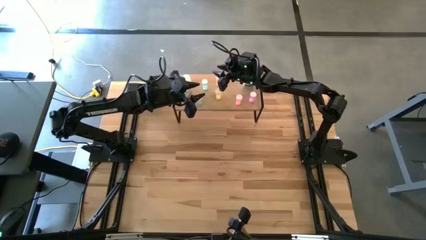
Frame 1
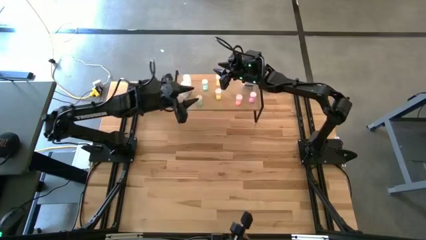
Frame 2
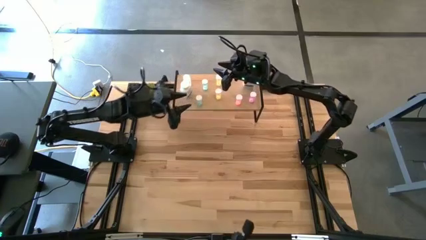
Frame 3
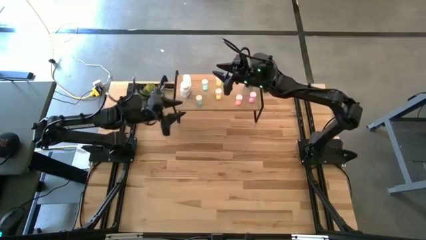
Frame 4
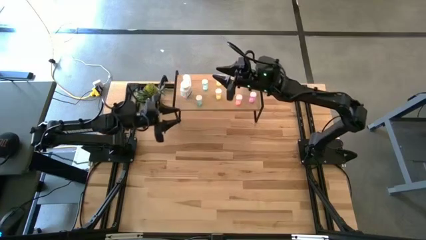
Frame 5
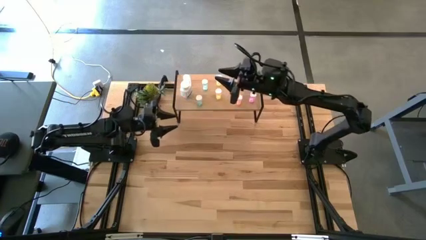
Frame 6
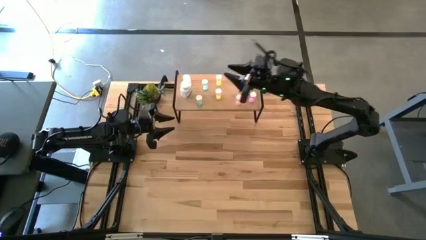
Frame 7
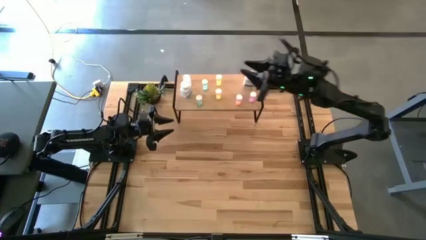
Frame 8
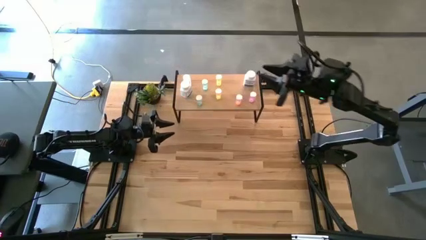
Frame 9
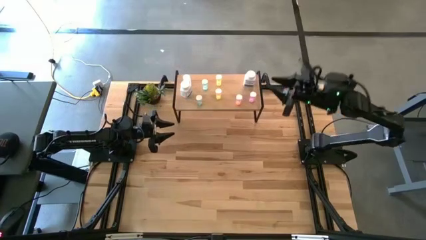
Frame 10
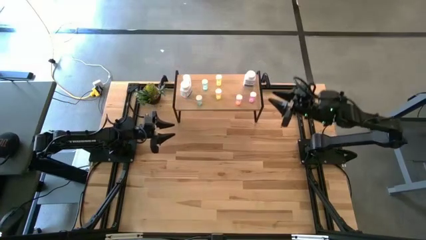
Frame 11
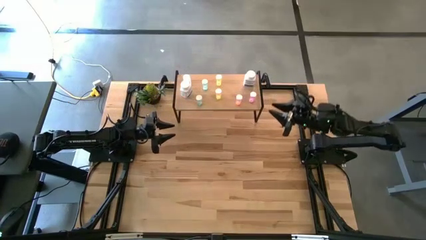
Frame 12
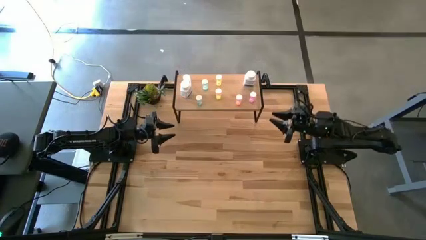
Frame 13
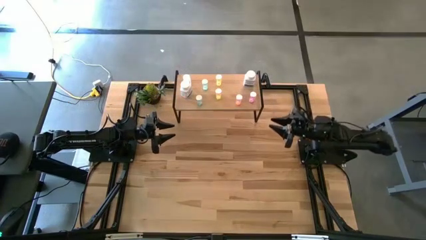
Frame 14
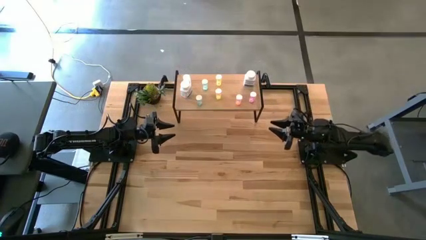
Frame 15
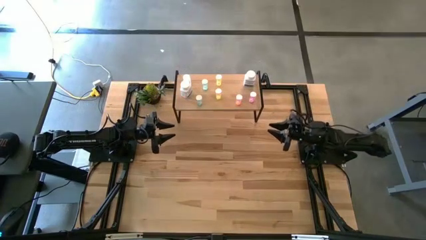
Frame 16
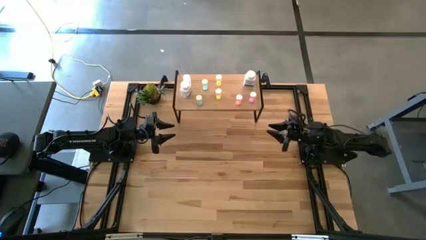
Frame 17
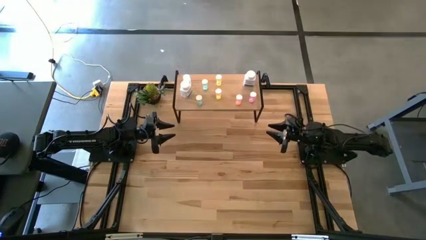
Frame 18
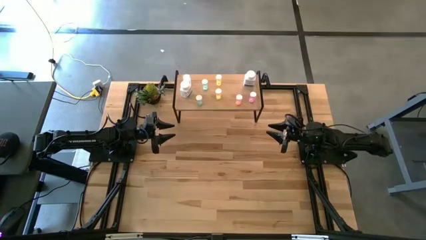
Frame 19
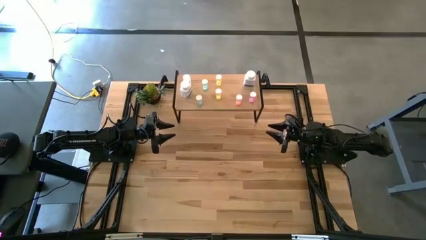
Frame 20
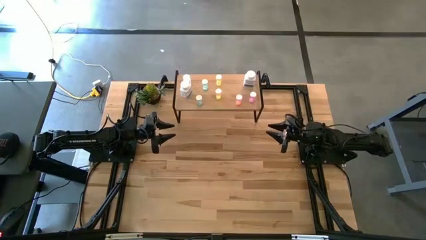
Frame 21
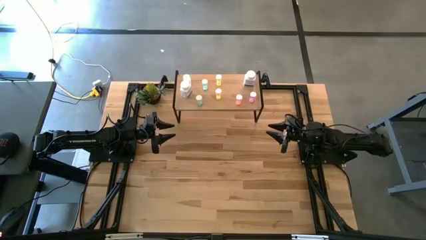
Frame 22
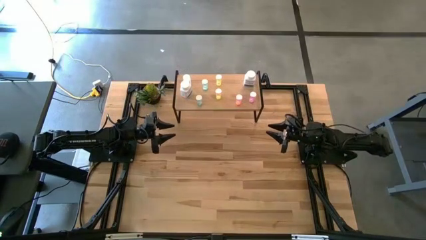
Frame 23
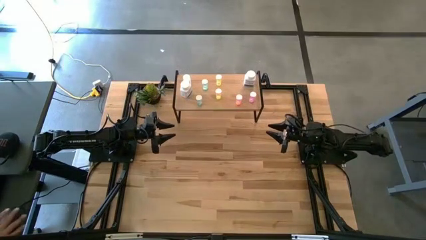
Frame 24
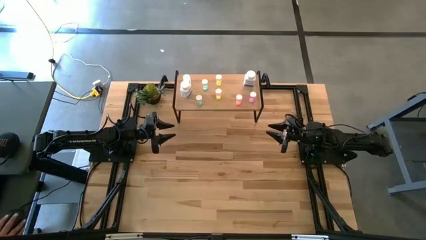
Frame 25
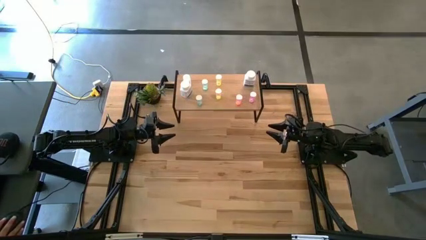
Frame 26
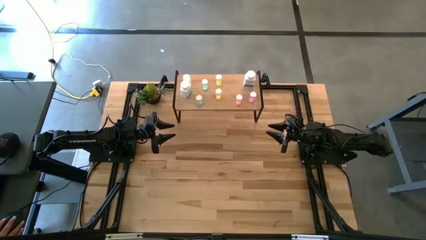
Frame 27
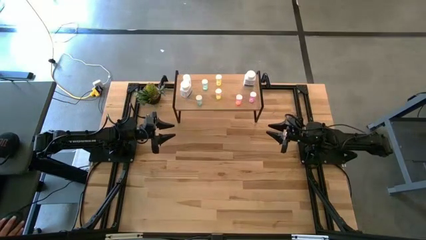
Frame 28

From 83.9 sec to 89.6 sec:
Task: Pick and place medicine bottles onto shelf by color
Return to Home Position

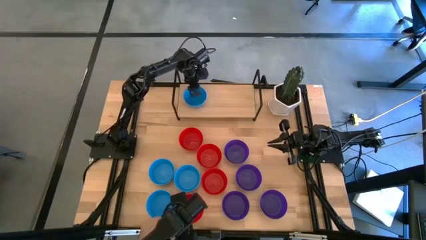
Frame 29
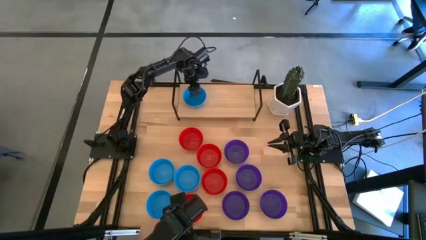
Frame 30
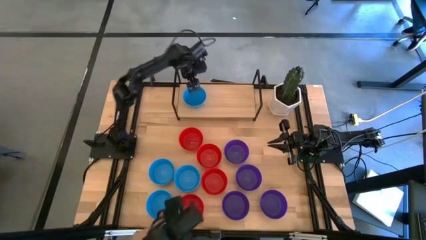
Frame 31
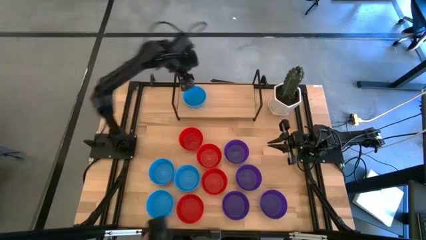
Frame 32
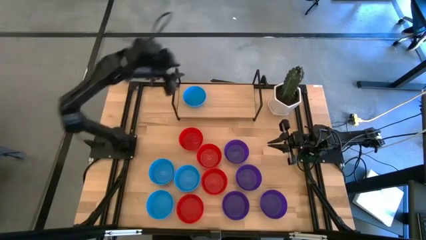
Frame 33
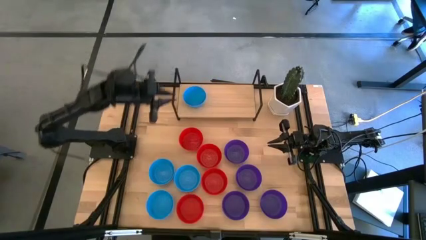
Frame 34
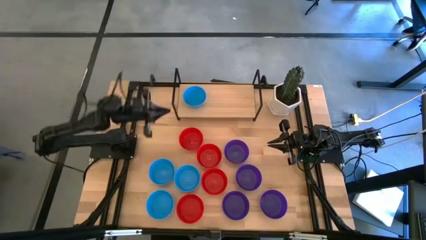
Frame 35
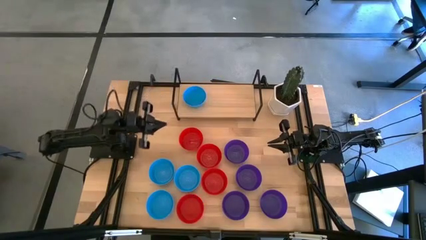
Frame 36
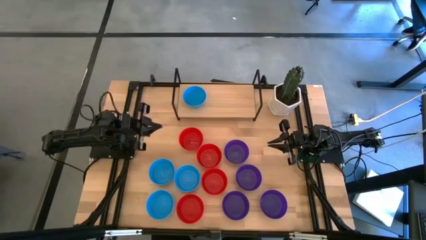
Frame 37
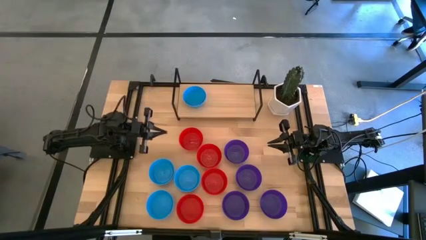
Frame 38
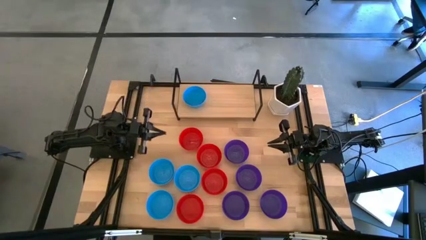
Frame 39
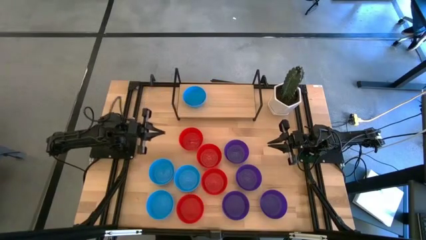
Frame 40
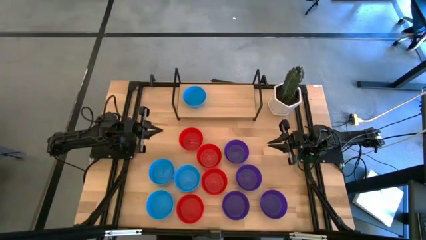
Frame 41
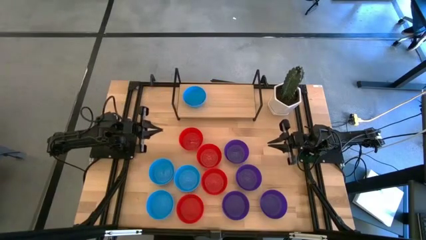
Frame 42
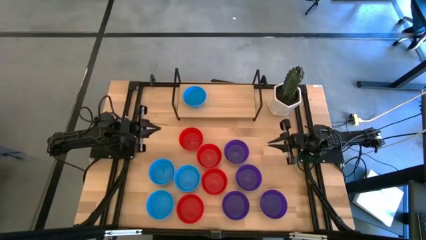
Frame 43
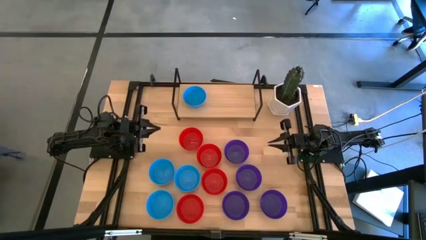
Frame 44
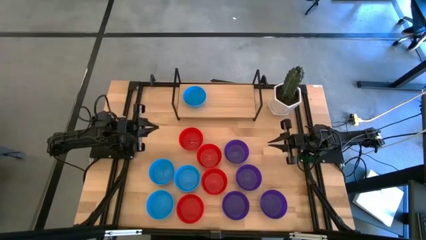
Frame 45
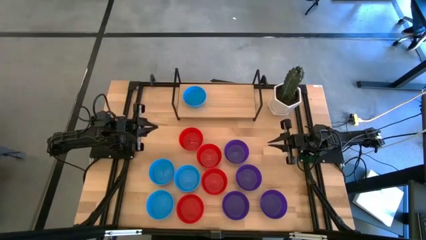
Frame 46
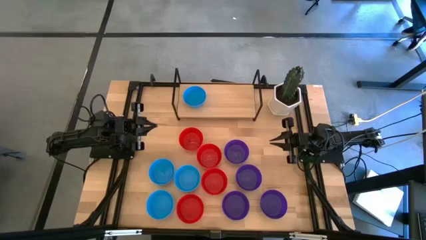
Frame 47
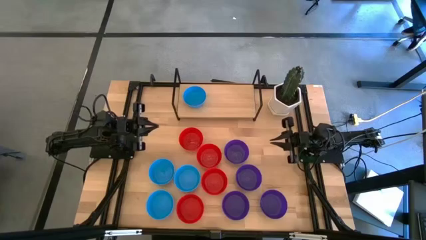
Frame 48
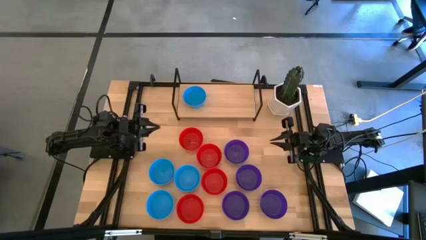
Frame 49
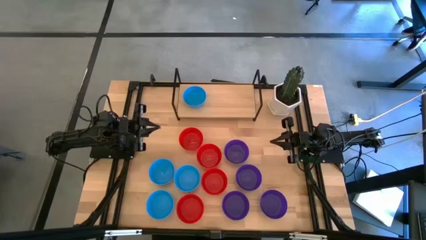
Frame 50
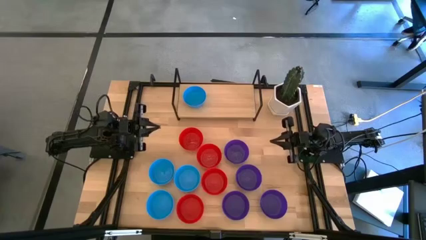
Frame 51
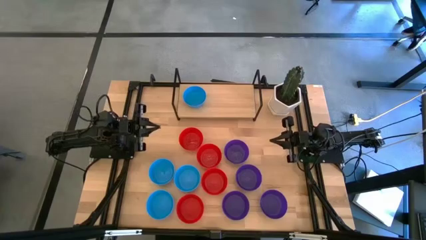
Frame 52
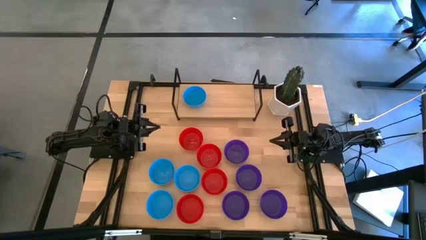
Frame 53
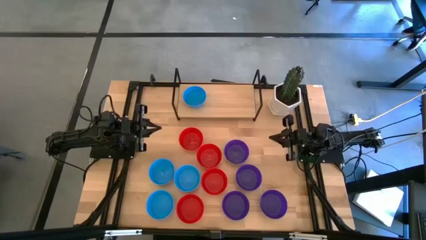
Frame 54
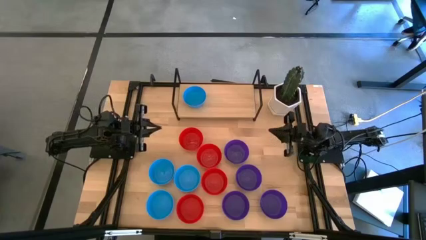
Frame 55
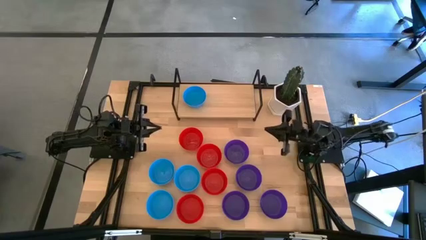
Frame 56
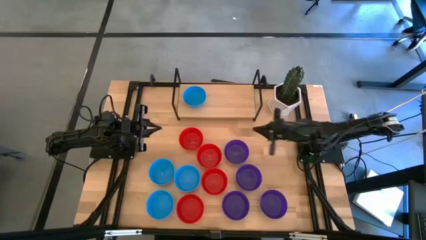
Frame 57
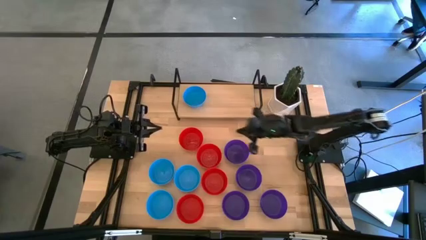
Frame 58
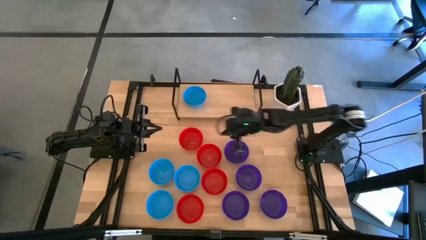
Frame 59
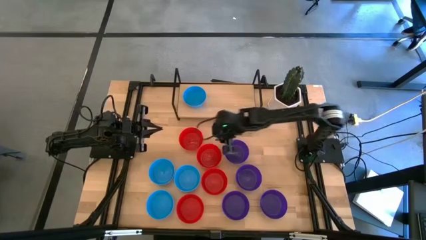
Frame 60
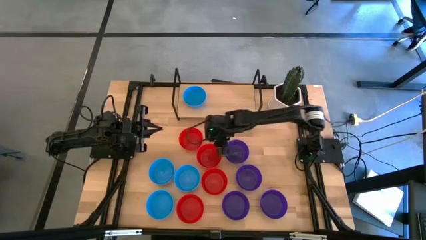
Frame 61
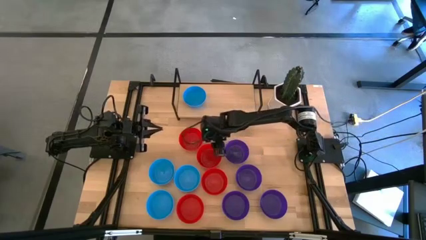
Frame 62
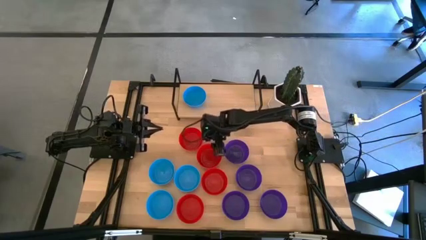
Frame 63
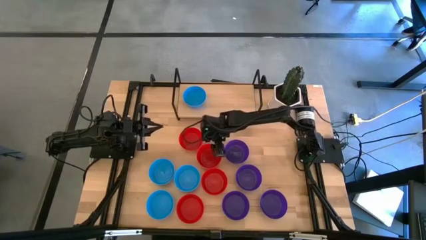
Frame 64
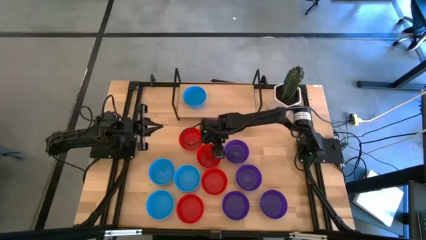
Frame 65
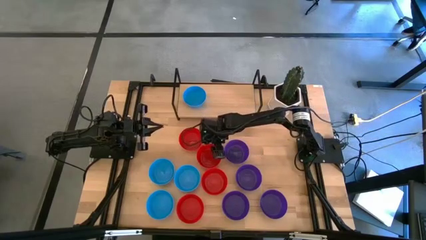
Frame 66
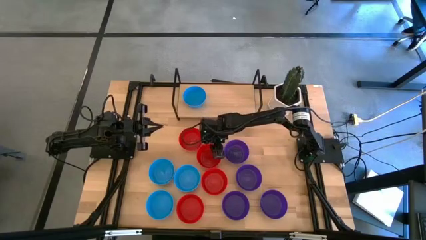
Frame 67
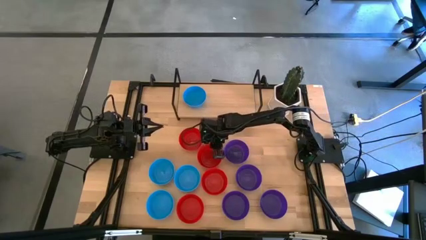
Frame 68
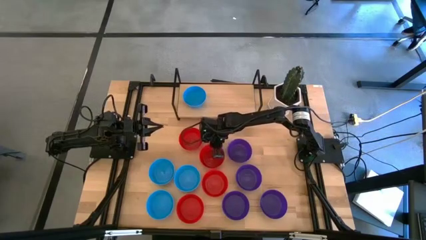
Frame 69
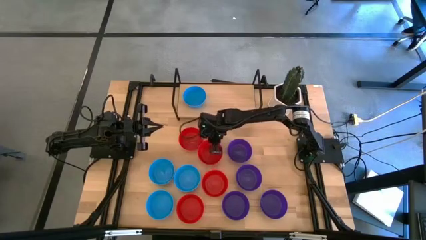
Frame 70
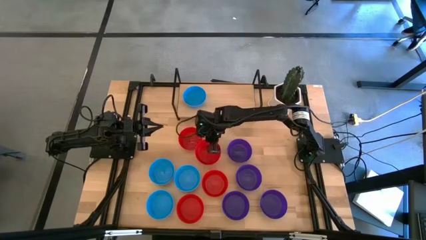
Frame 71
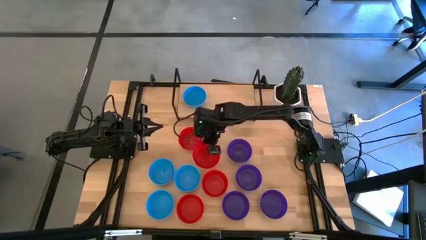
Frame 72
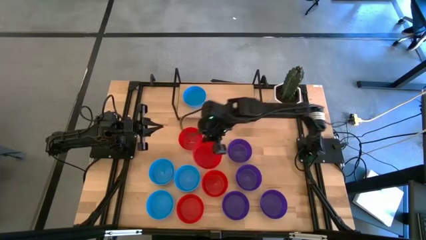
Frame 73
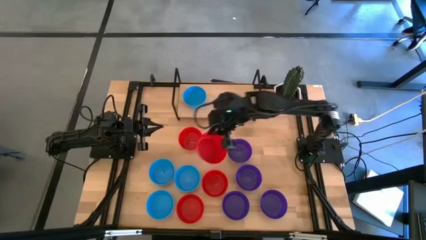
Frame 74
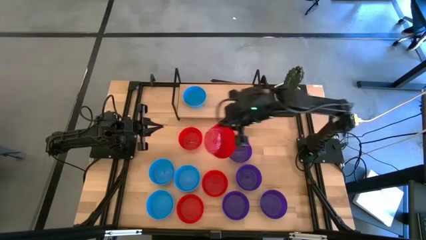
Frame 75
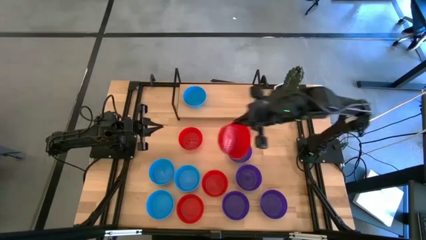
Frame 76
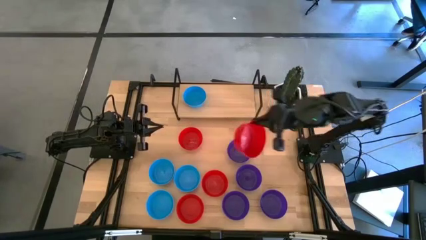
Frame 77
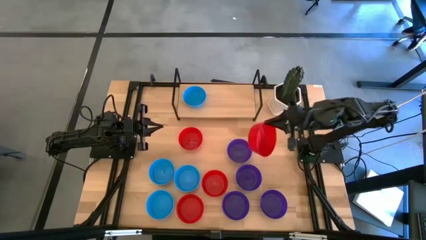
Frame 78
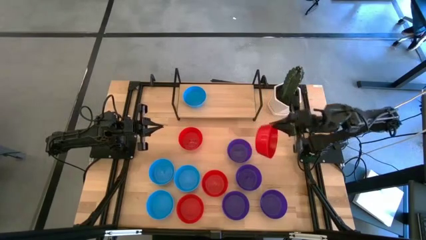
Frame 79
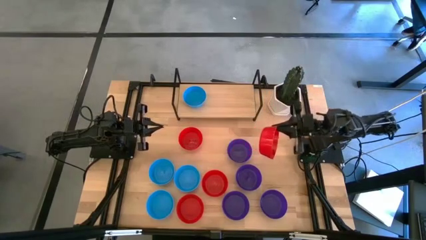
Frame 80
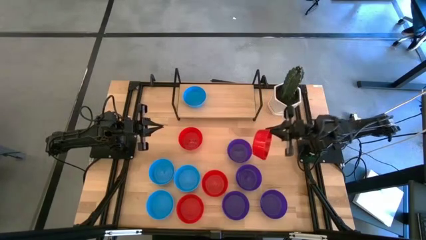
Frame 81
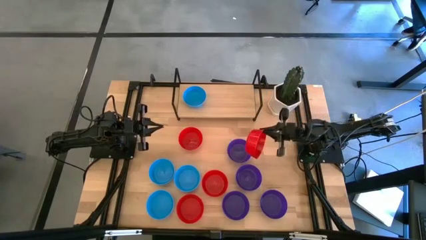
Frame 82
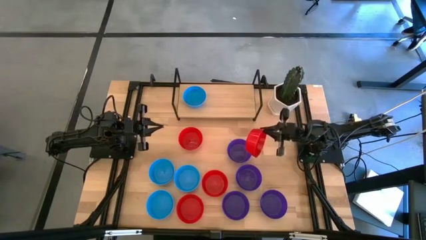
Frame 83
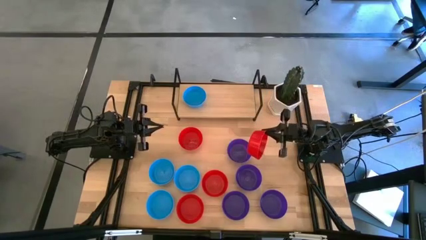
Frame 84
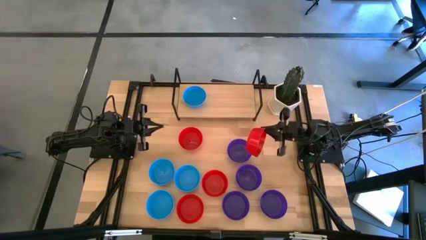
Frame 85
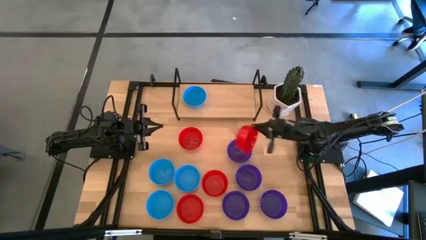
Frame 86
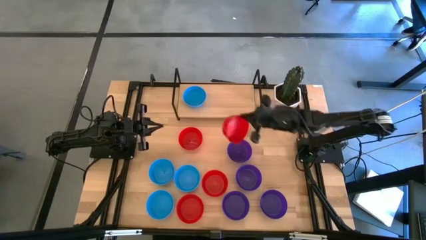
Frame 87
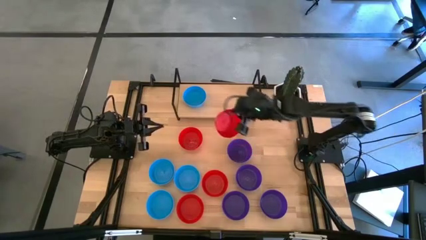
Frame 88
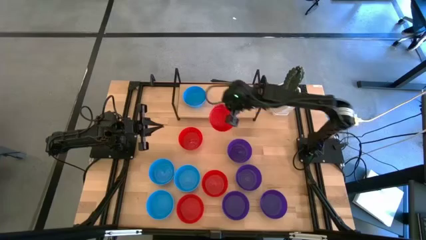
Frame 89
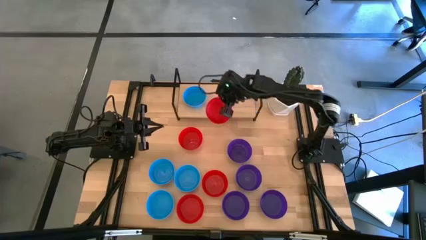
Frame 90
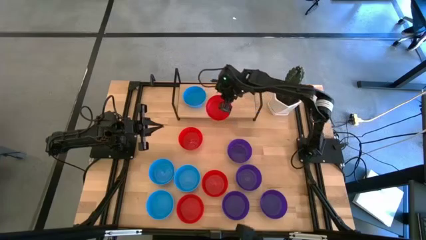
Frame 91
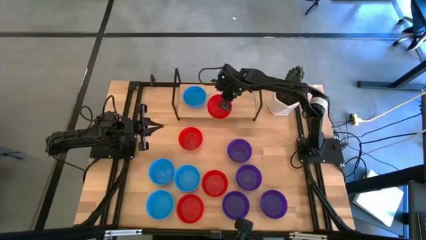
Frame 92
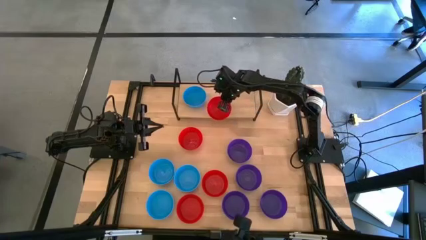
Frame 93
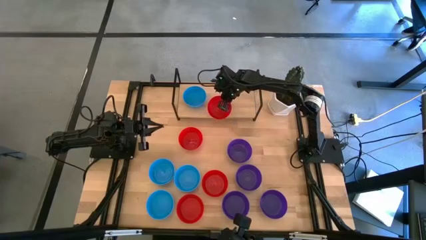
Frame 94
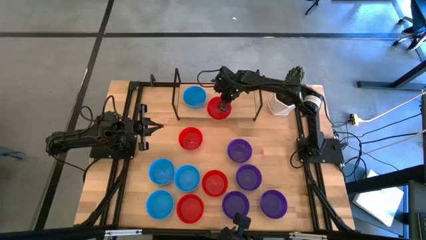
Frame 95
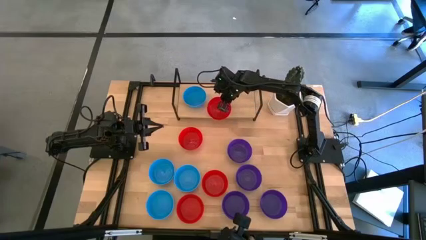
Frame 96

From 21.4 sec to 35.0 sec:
Task: Pick & Place Mini bowls
Put the red bowl on the shelf
